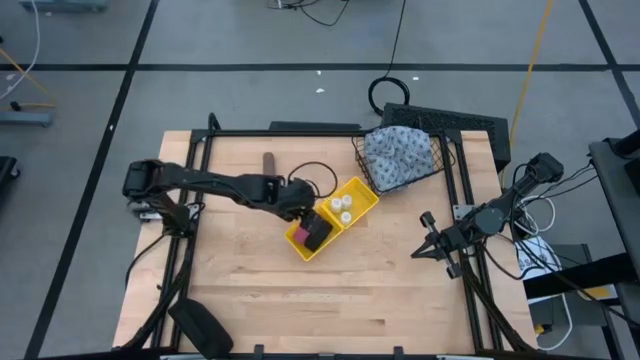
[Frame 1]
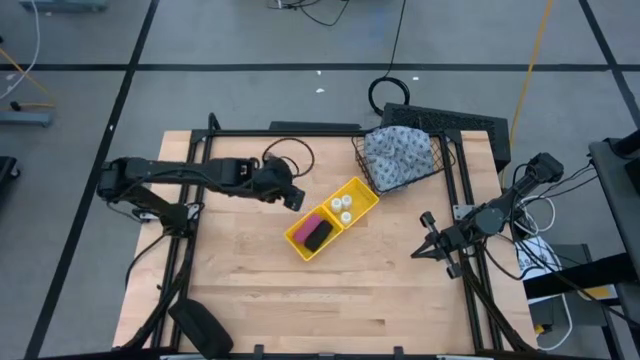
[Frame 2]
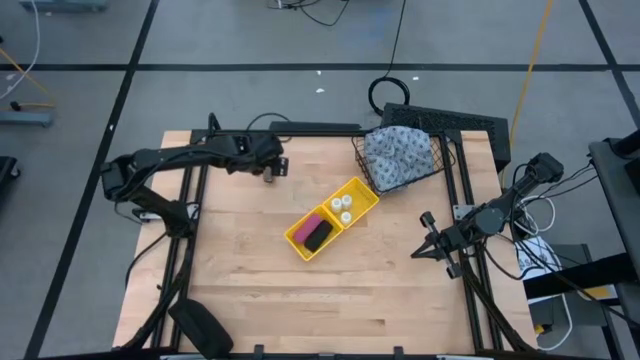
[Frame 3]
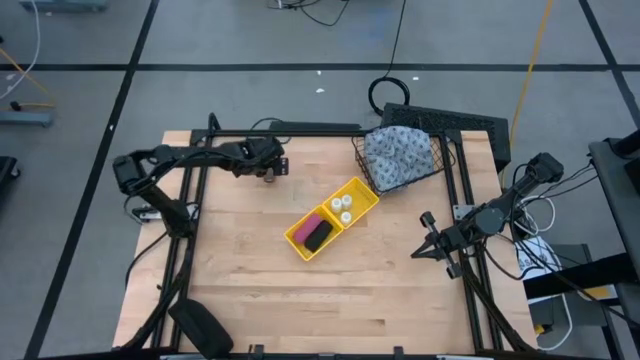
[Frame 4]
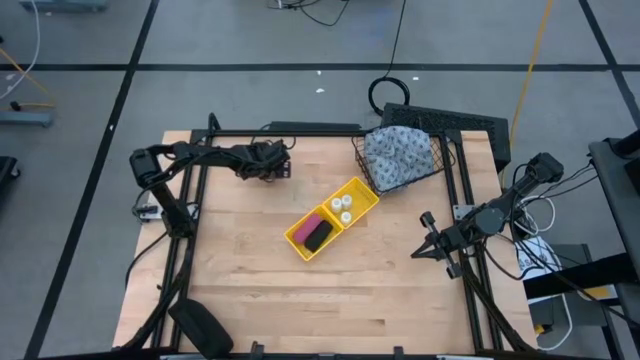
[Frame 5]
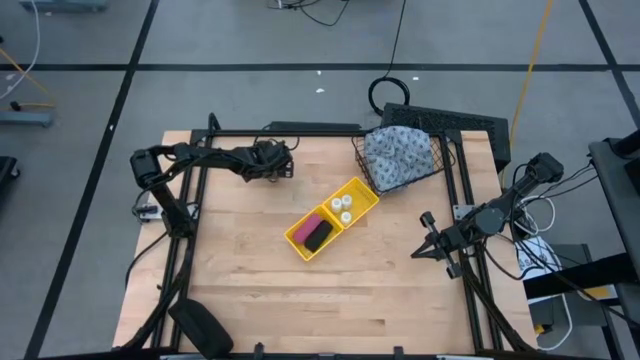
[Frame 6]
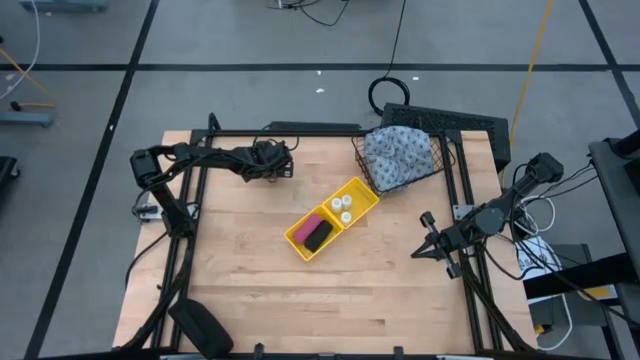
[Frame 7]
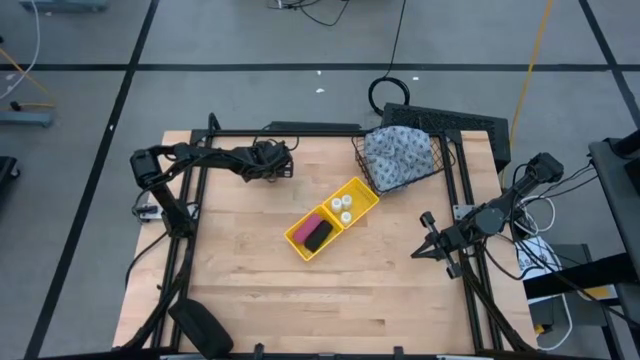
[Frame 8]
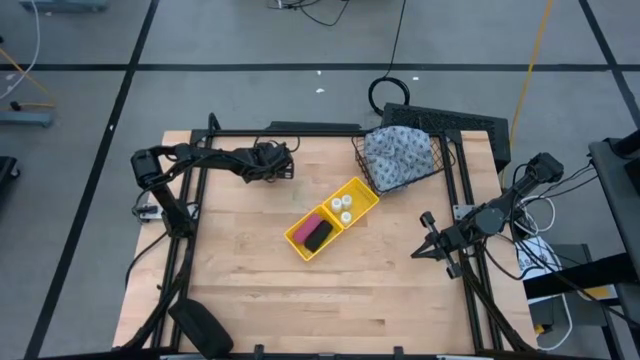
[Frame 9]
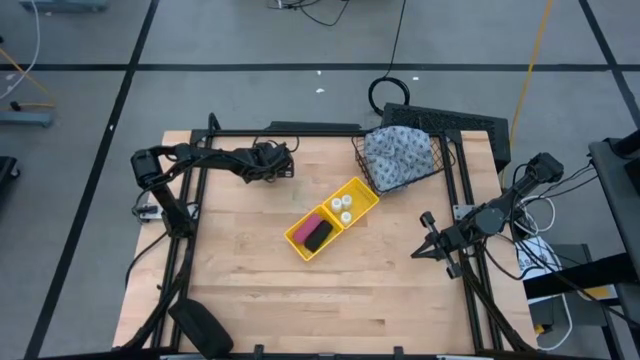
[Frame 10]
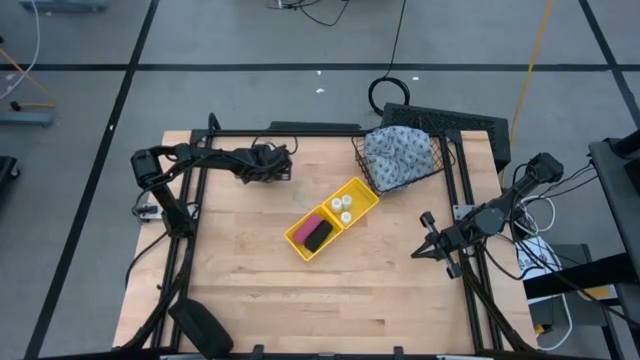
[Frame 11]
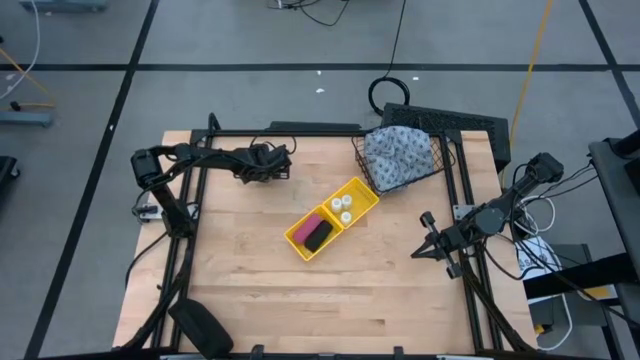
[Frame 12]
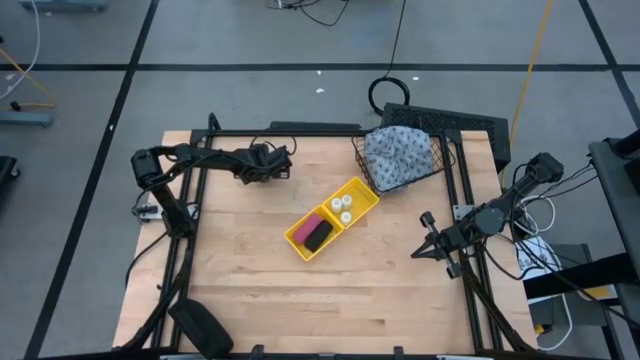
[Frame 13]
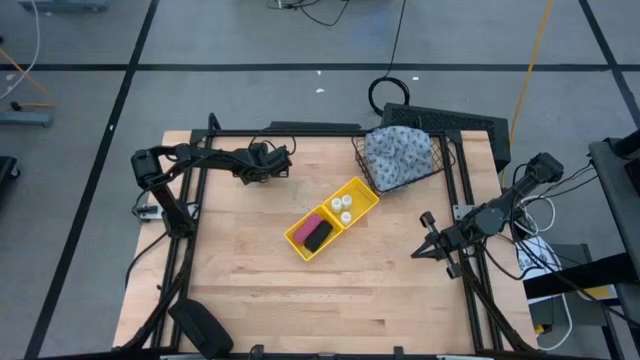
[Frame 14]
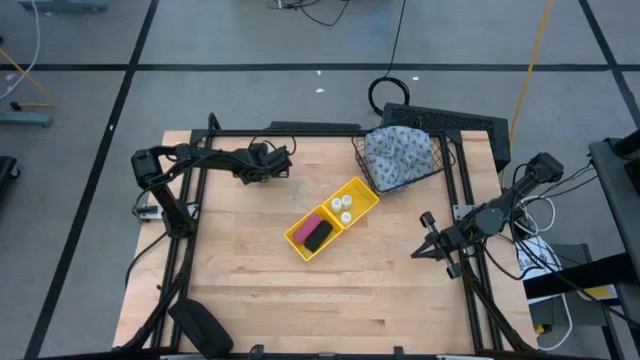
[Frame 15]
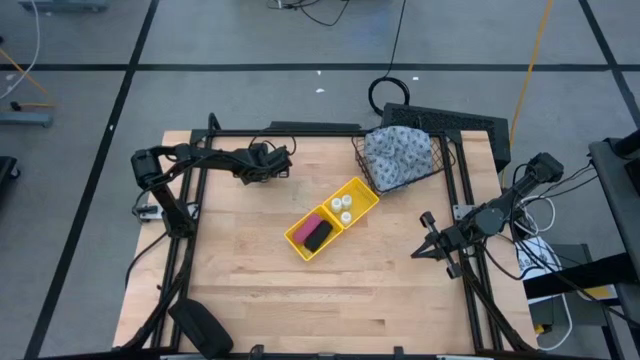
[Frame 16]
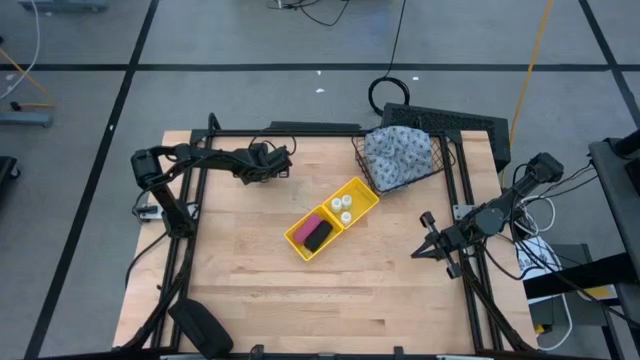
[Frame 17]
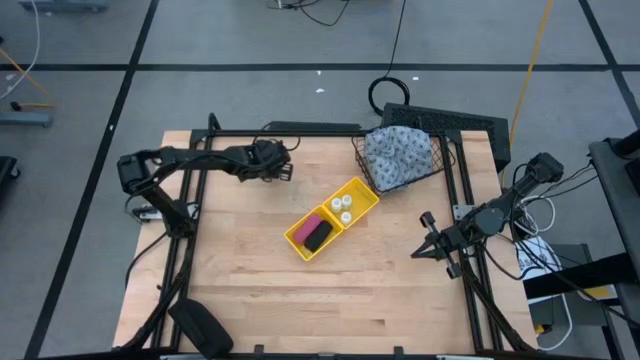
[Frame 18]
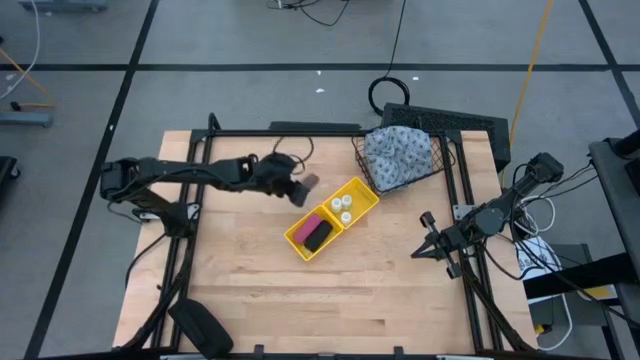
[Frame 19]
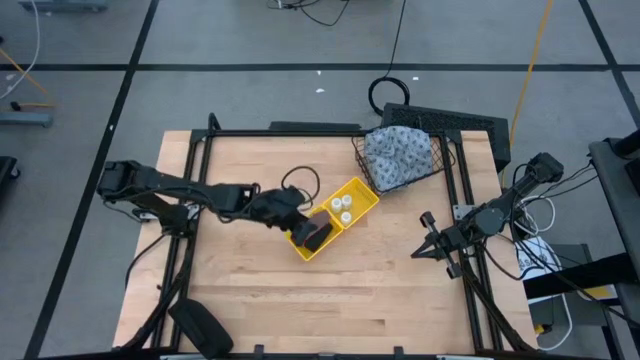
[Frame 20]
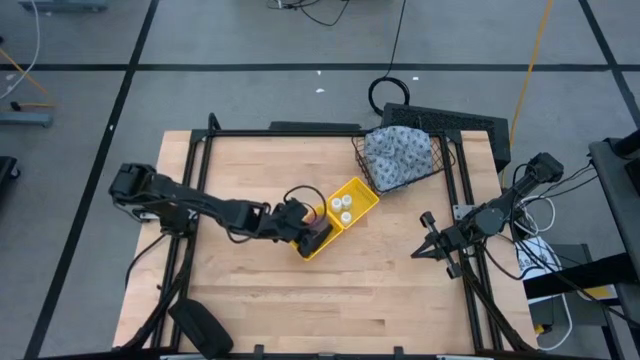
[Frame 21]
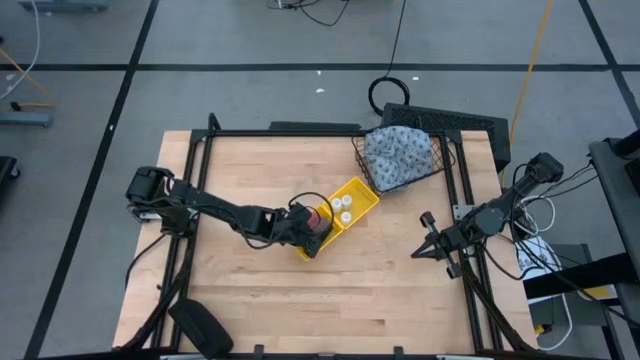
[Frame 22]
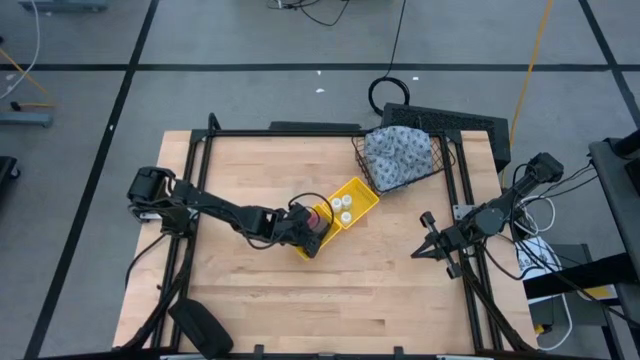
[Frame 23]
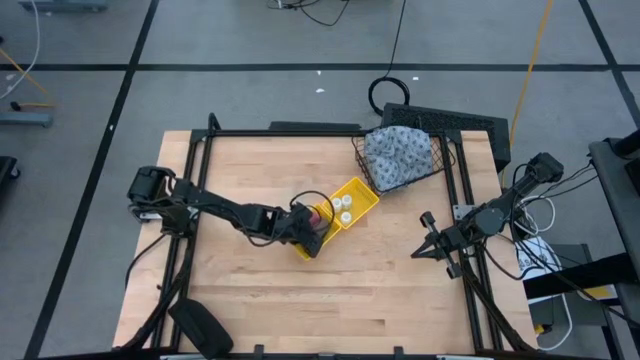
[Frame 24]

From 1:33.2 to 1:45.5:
Task: Pick & place medical supplies in basket/bin
Put the brown bandage into the bottom yellow basket

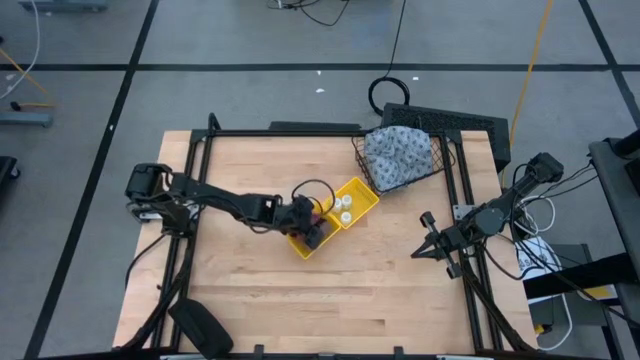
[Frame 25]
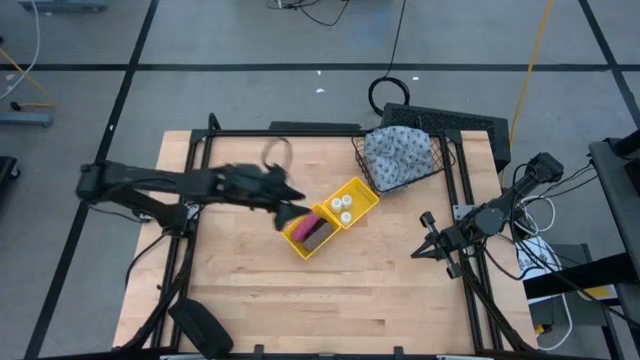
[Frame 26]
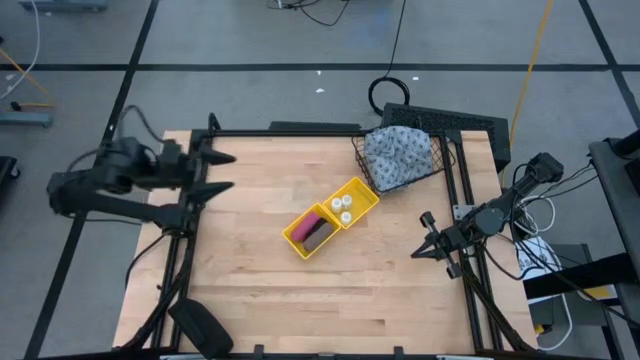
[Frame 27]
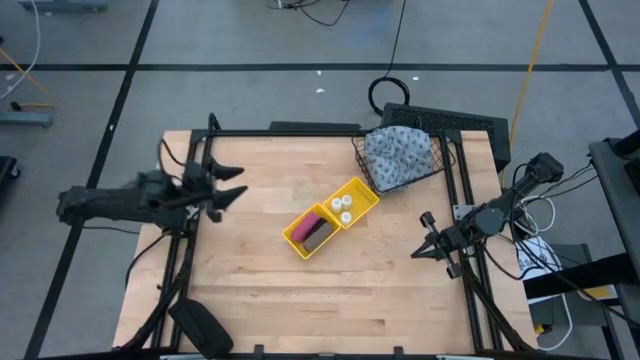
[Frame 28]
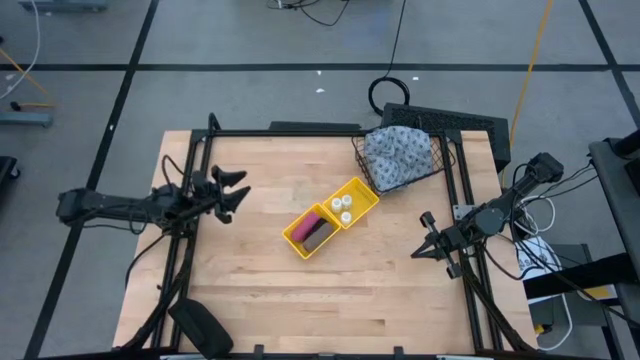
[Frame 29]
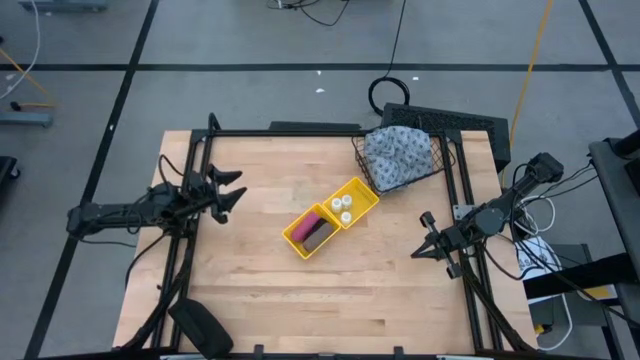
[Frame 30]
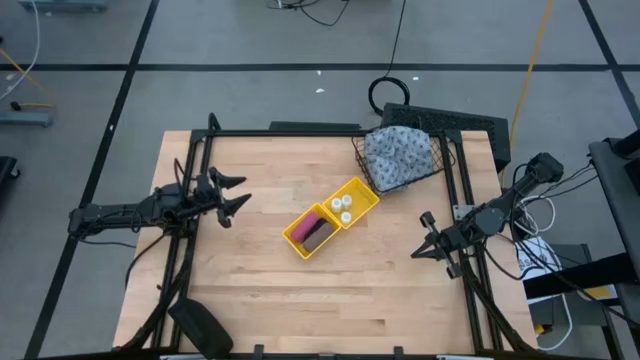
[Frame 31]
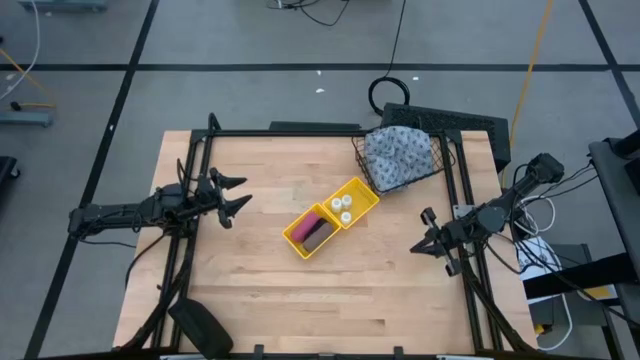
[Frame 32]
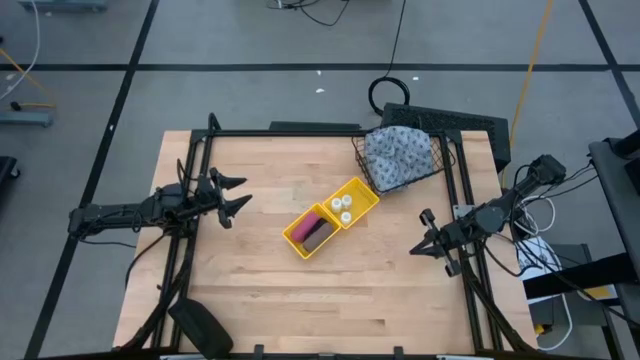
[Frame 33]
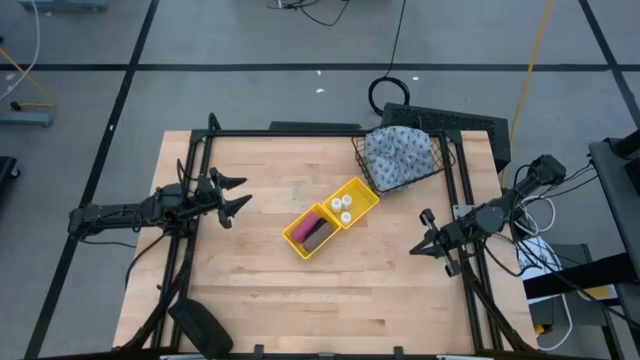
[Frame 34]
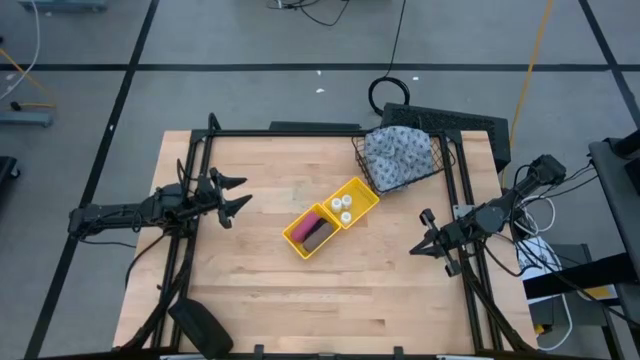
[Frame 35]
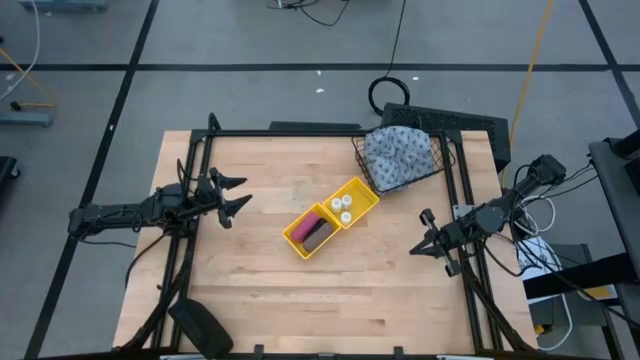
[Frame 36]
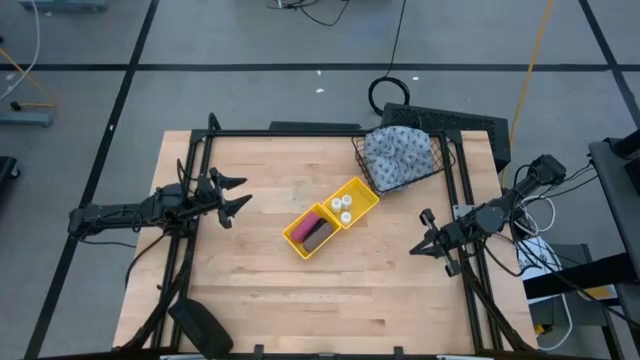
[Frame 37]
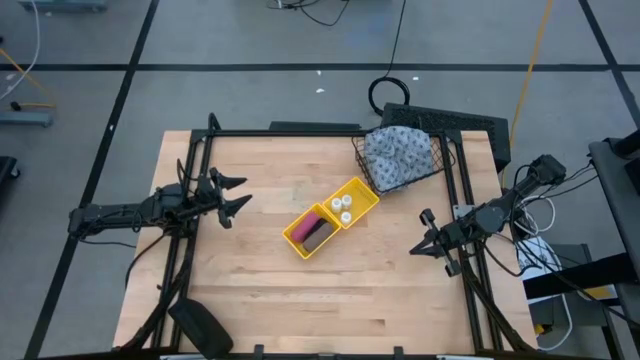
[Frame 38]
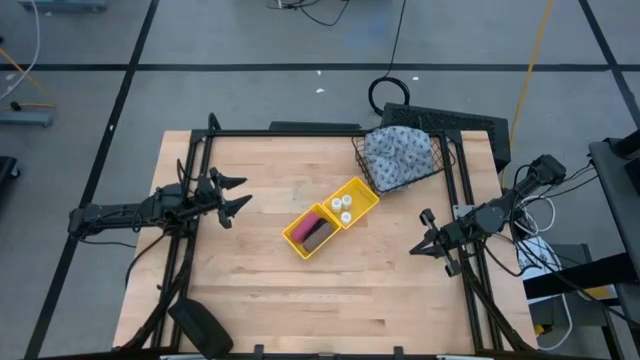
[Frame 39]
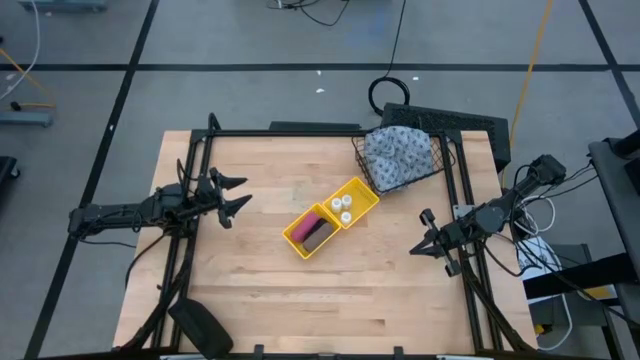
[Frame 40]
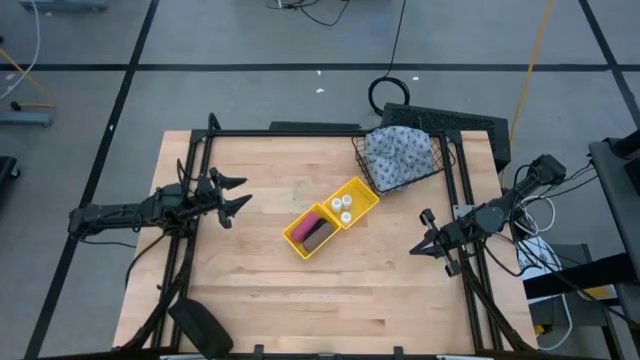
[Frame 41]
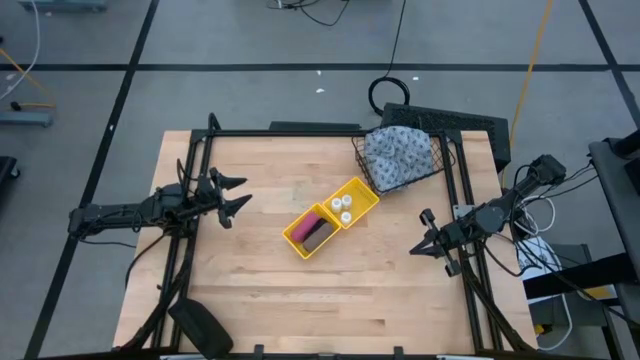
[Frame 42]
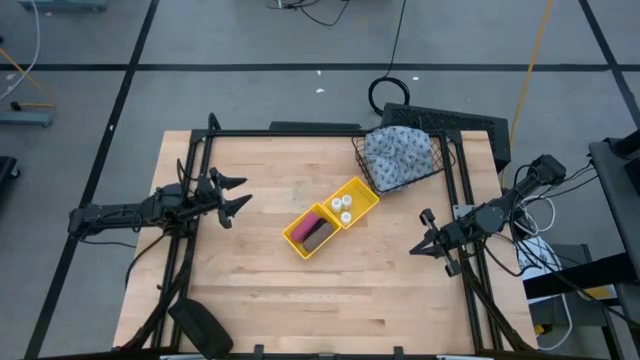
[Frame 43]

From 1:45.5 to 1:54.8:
Return to Home Position

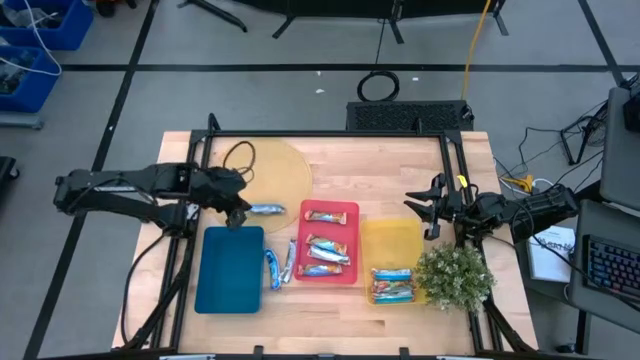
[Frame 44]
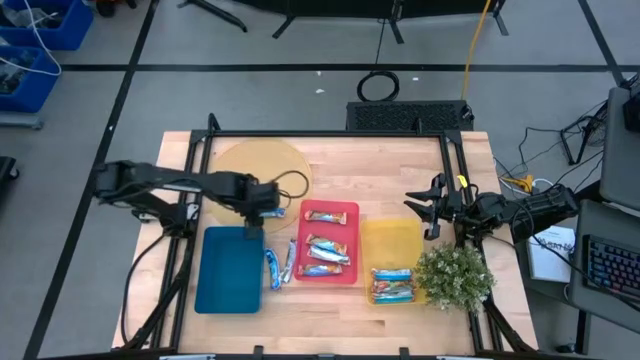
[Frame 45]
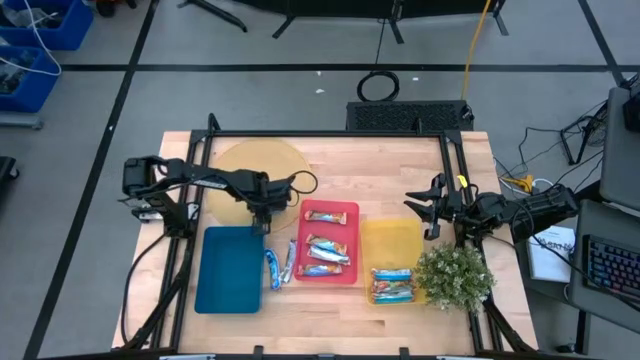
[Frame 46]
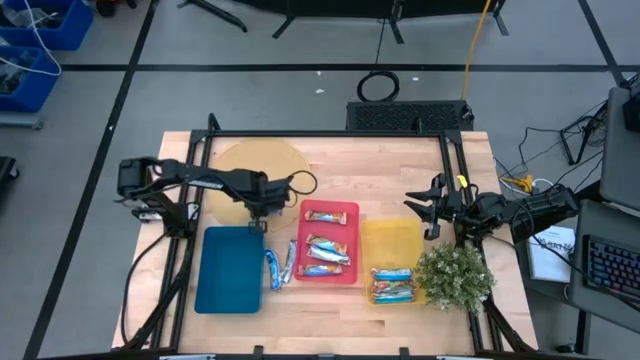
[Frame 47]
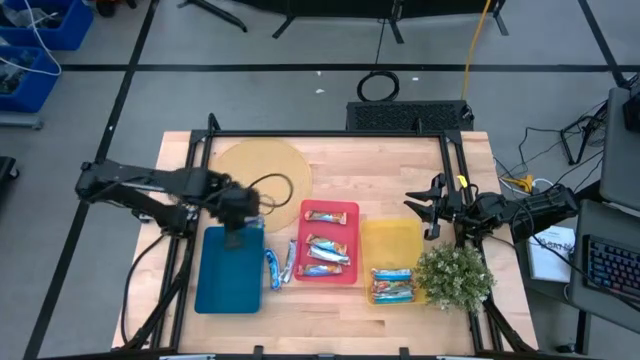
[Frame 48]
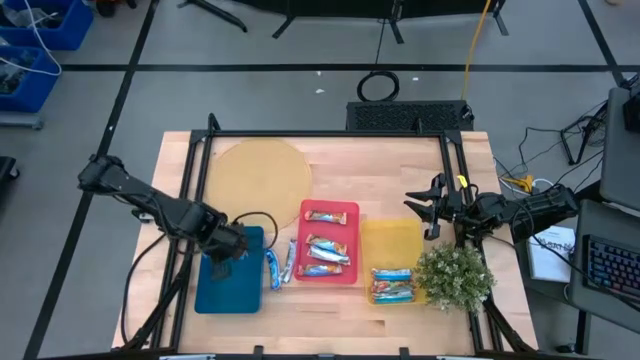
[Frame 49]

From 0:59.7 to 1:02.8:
Task: Pick and place Granola Bars by type
Put the blue granola bar into the blue bin
